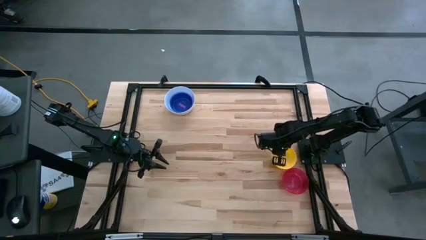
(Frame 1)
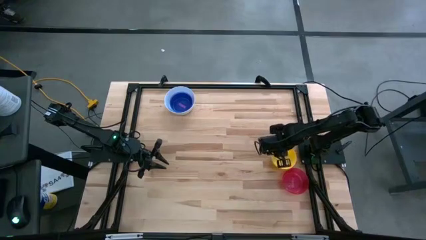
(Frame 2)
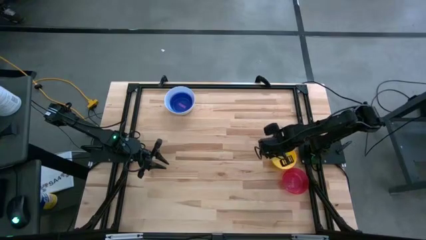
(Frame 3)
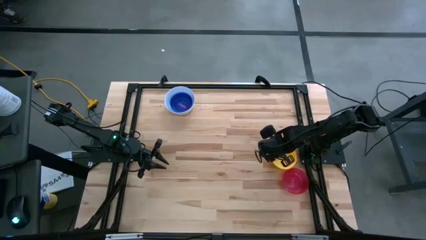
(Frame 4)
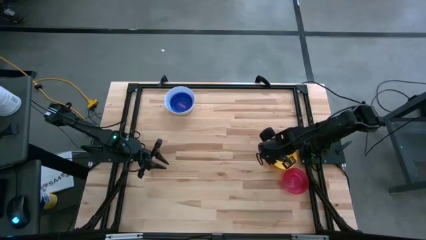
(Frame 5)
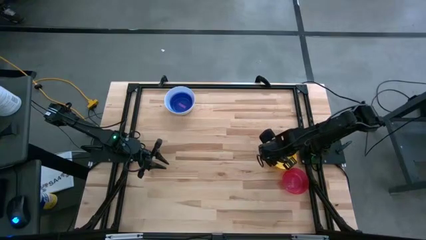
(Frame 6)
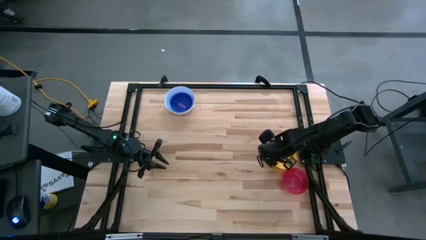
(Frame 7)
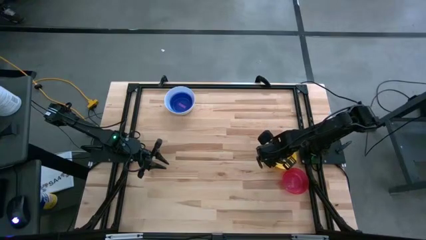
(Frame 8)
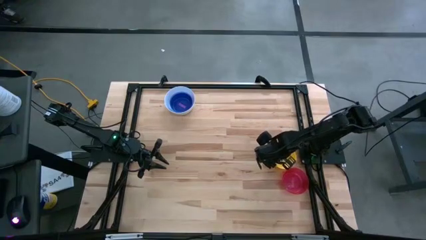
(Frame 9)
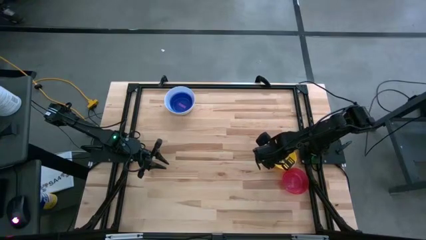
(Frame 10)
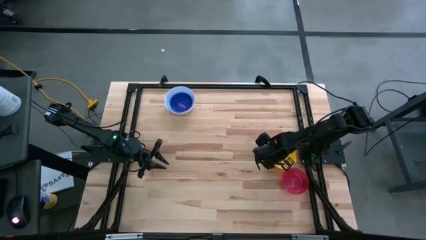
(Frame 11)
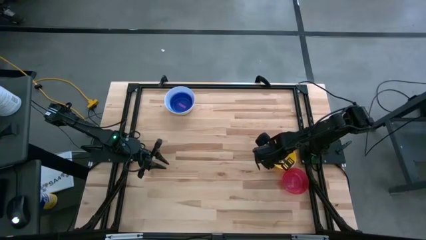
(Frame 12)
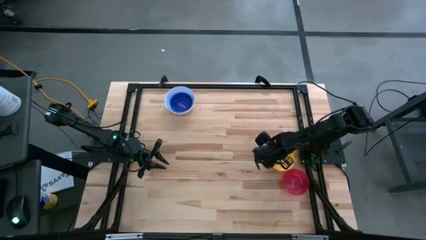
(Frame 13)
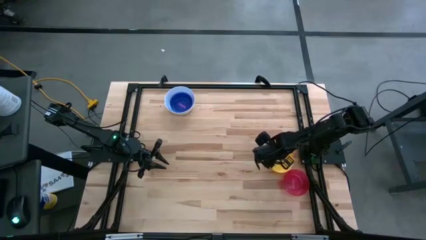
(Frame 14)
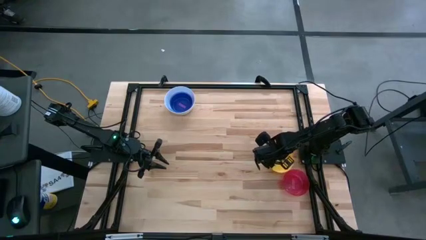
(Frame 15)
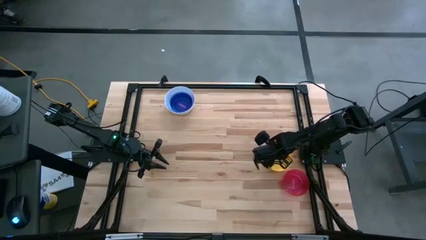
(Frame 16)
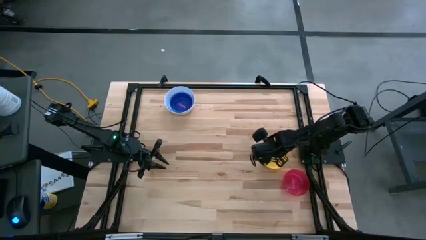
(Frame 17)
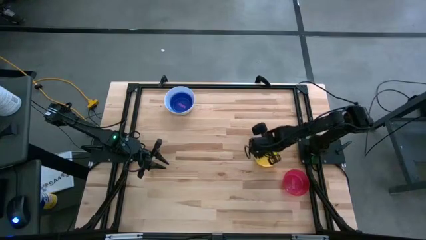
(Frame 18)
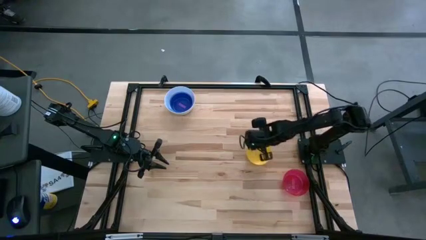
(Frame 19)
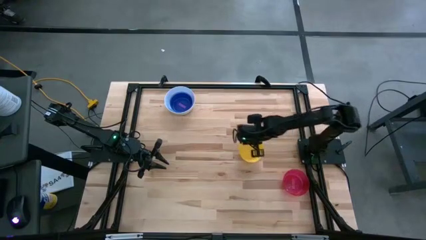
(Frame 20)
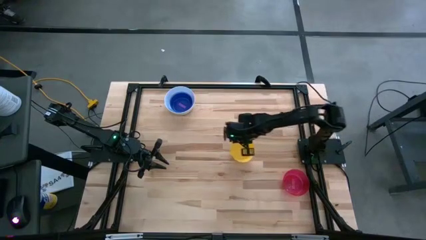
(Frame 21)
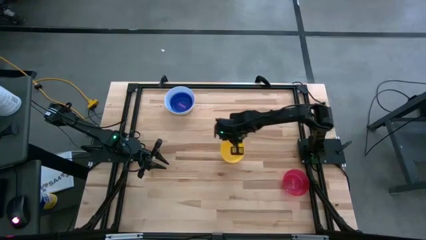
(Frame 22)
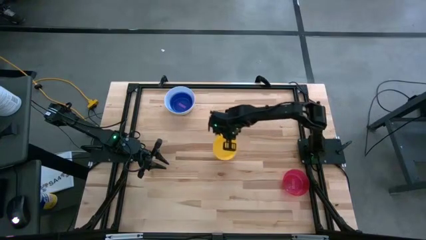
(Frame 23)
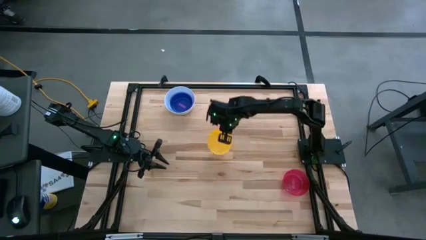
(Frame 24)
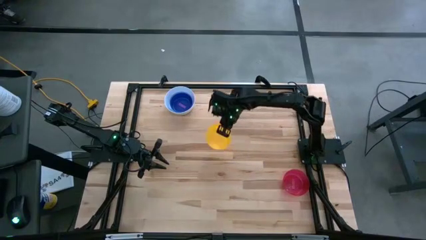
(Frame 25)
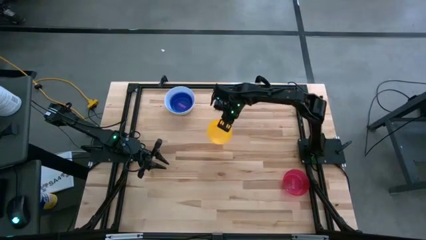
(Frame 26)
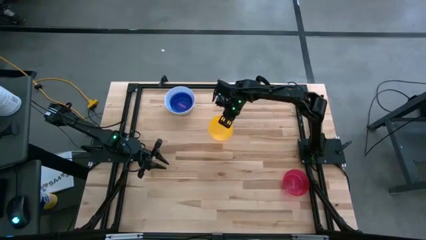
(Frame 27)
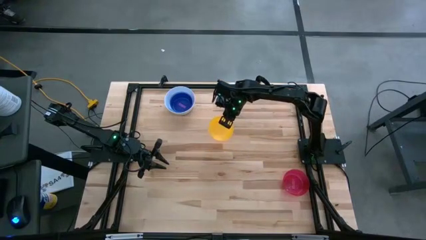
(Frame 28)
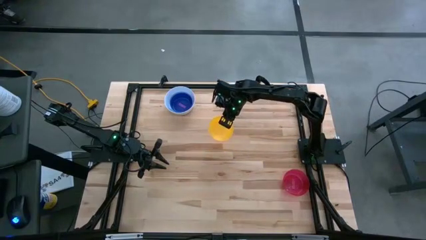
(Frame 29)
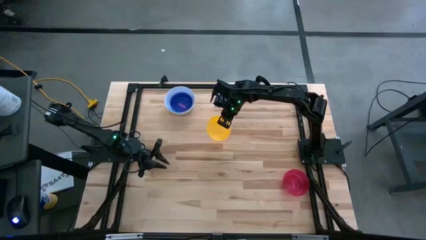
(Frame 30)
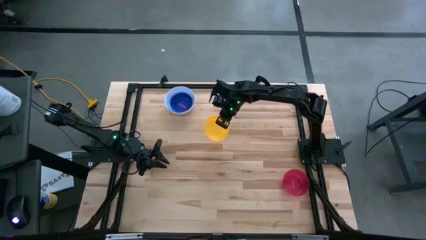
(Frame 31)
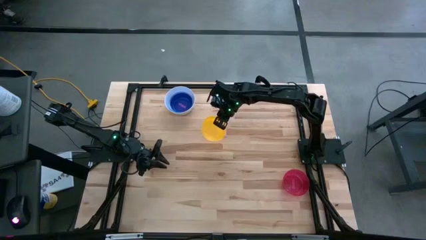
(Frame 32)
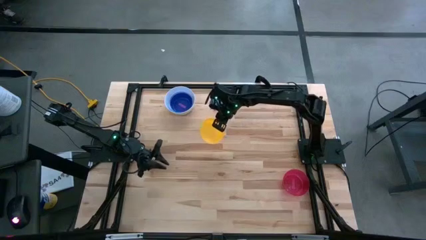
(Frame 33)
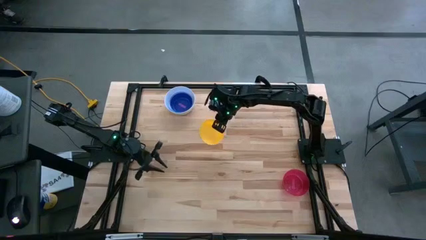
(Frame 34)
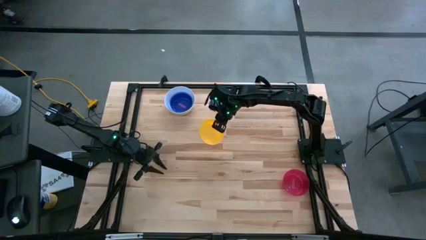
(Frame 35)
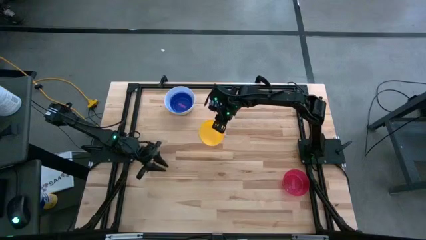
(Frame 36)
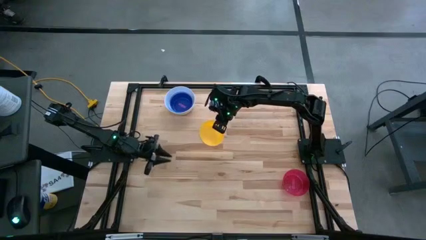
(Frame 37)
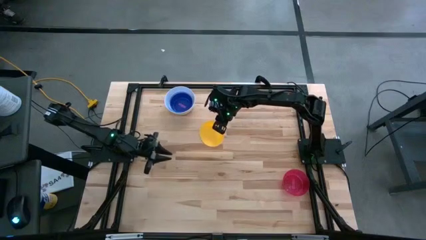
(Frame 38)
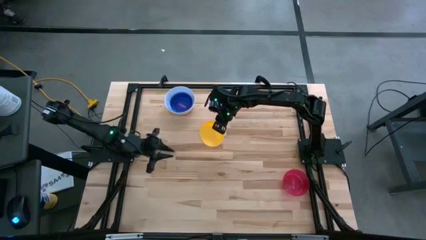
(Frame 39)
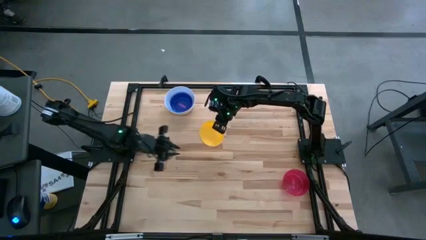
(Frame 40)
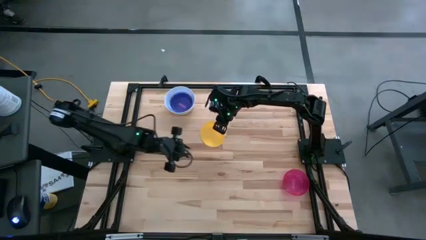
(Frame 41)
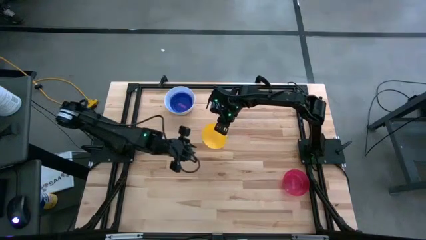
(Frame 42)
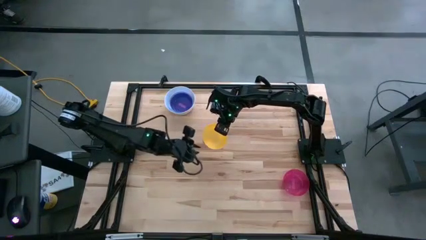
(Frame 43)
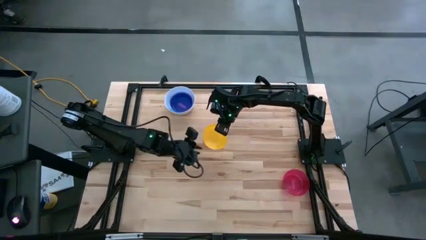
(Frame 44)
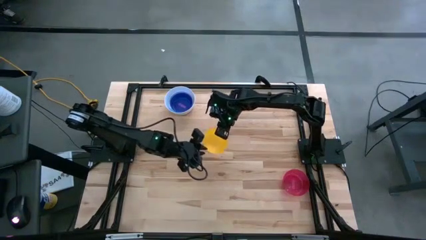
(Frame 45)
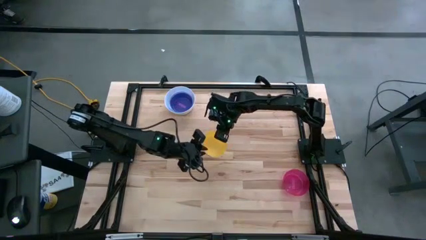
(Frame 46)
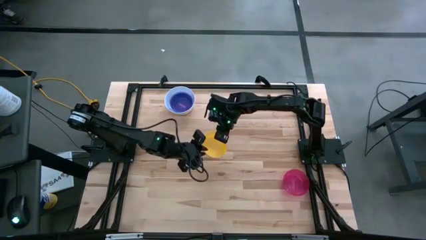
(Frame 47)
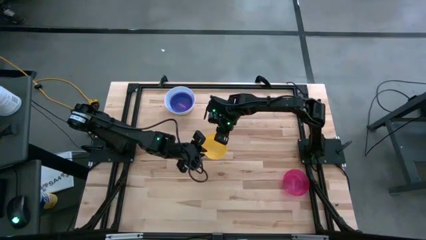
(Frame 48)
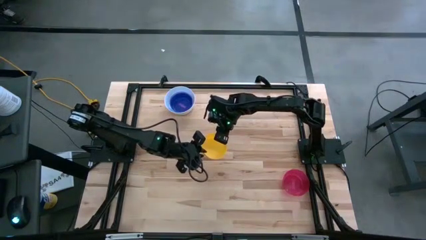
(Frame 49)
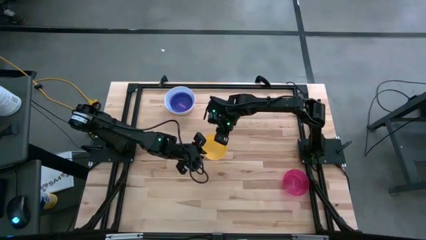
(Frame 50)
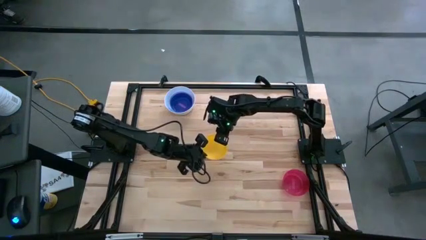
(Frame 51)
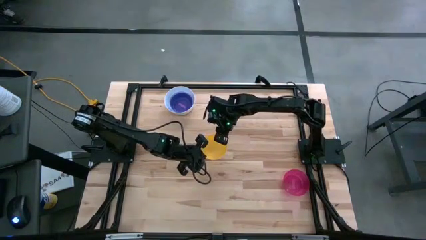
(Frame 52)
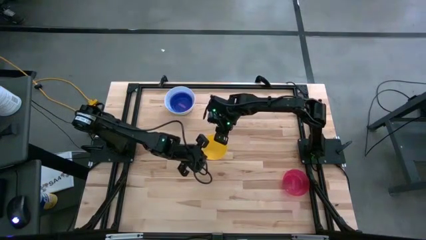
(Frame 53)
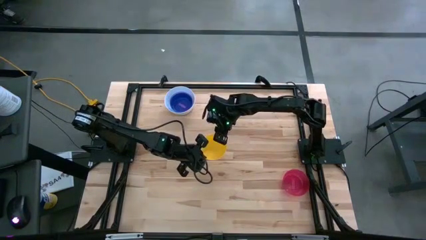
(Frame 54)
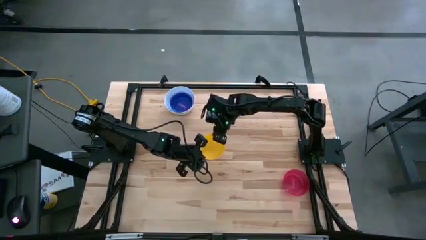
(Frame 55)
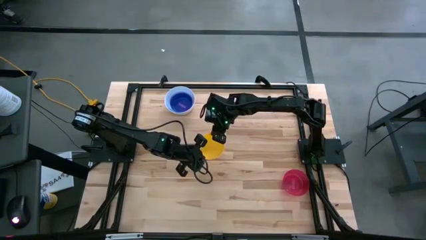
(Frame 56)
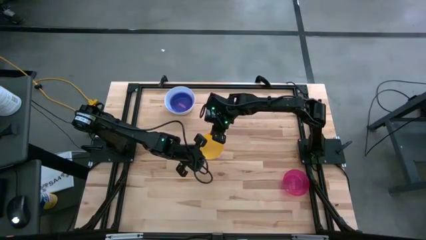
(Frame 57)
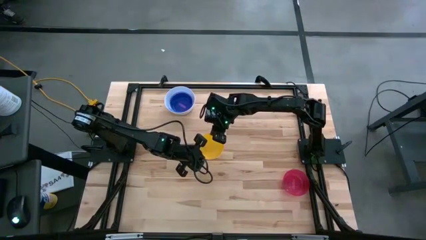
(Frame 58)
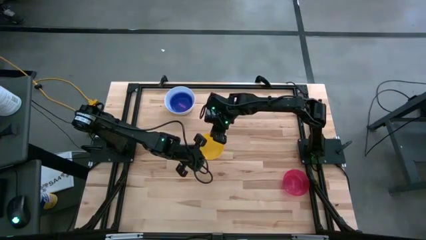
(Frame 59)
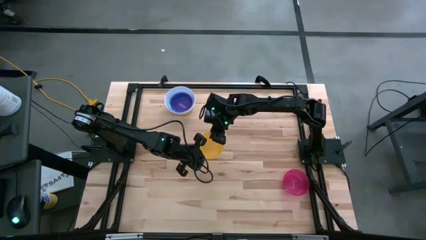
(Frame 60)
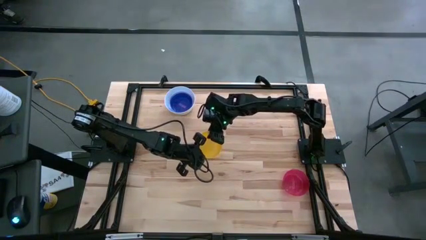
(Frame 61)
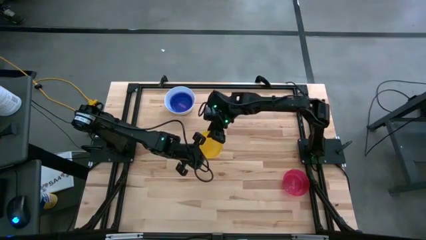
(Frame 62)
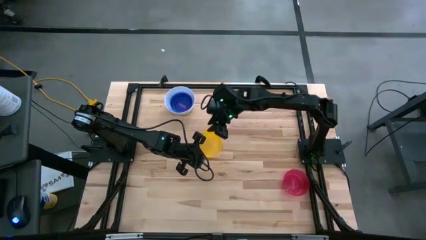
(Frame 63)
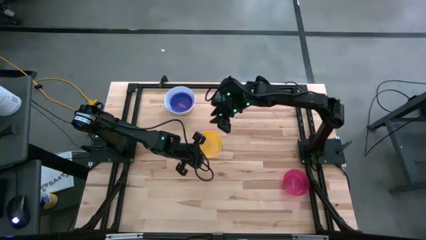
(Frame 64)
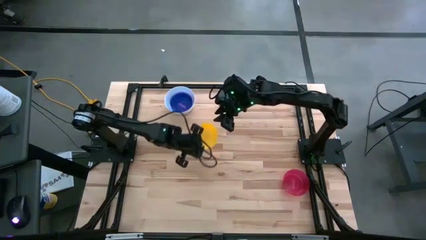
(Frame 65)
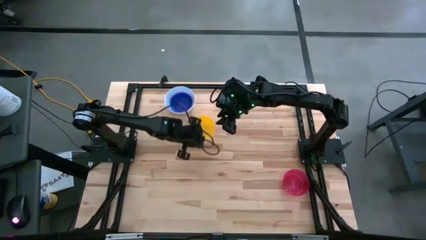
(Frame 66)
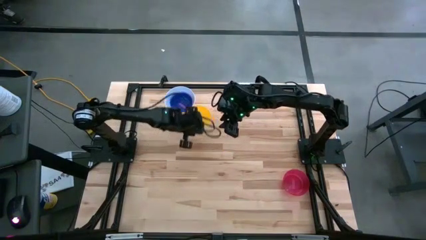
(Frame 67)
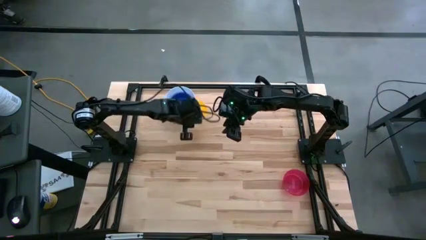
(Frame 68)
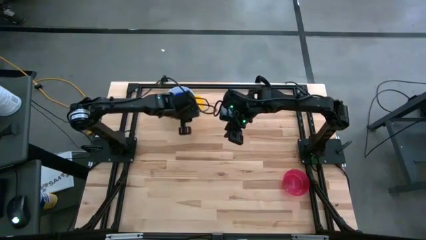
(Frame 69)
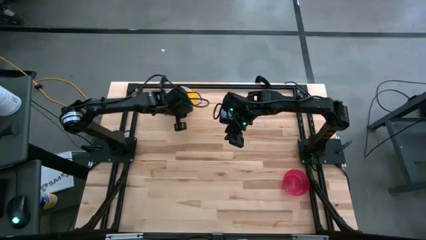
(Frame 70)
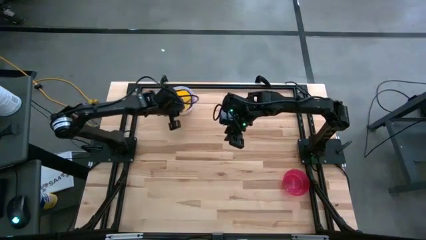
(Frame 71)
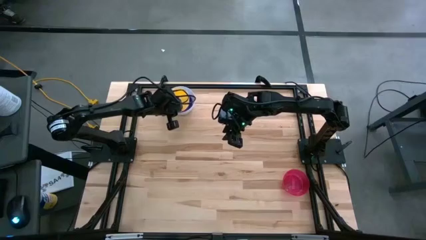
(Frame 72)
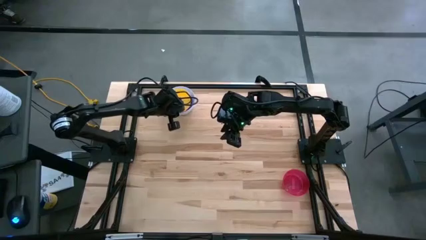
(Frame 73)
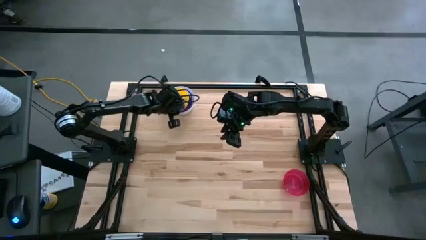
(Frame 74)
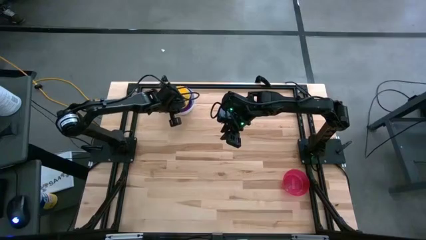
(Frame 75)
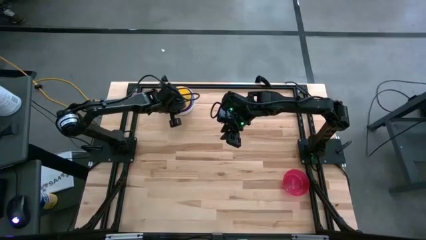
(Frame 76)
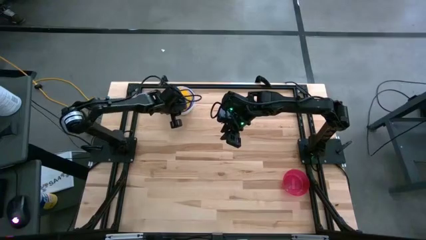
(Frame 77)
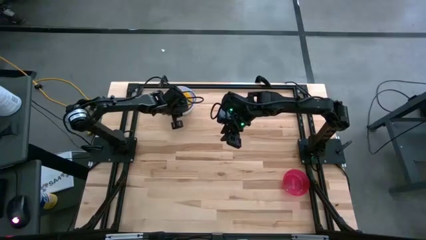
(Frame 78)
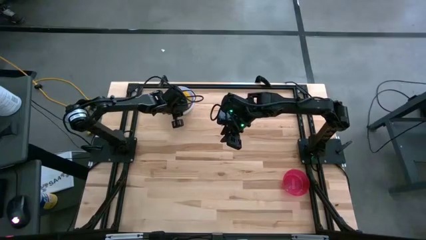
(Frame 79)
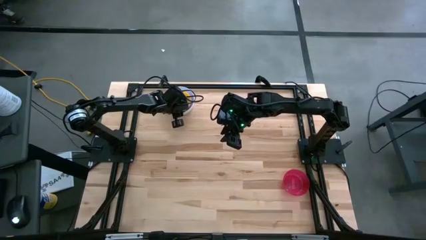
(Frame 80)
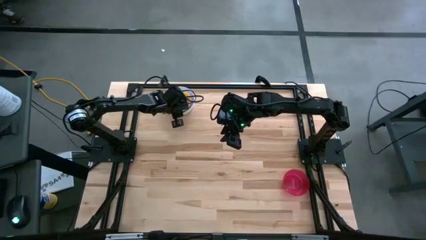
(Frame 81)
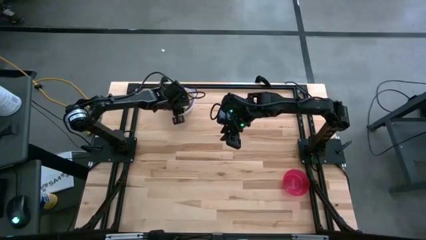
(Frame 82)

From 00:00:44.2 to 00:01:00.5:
Stack the yellow bowl on top of the violet bowl
